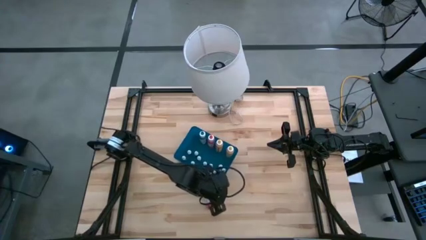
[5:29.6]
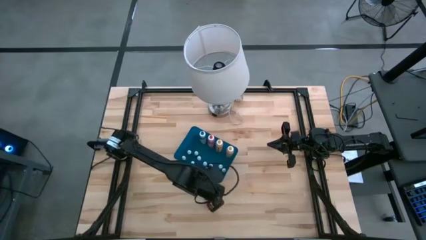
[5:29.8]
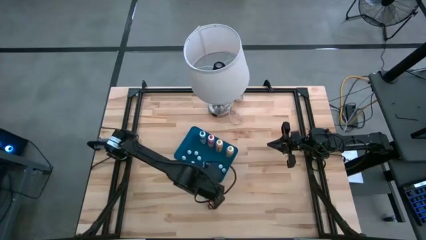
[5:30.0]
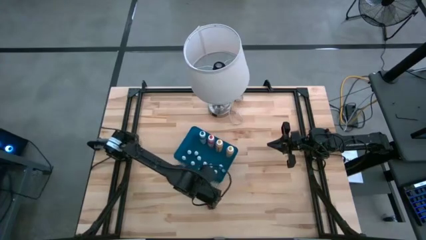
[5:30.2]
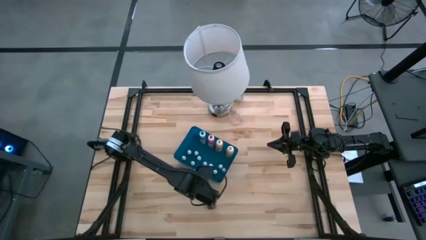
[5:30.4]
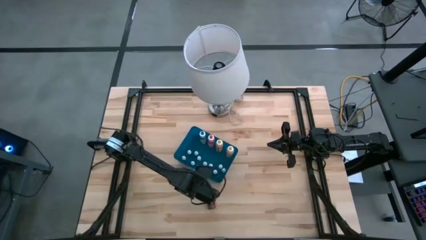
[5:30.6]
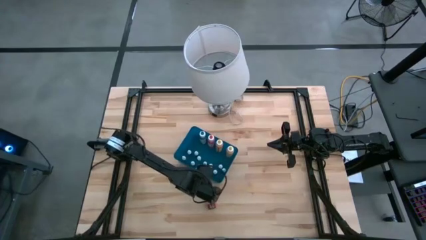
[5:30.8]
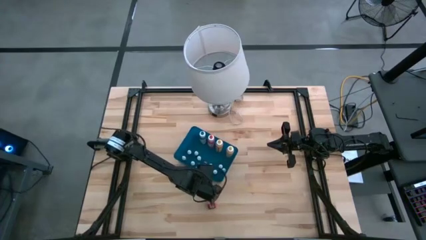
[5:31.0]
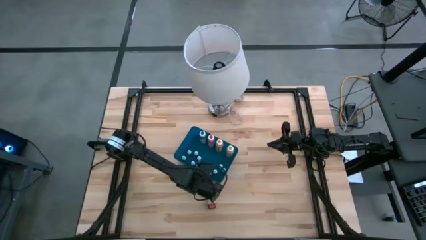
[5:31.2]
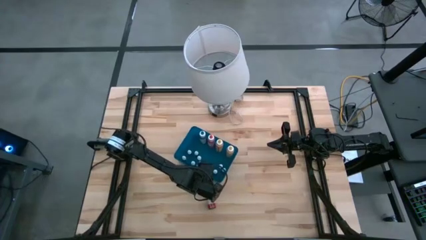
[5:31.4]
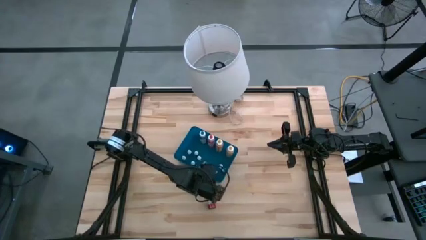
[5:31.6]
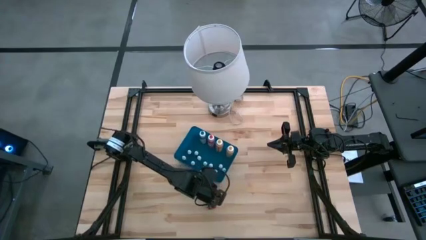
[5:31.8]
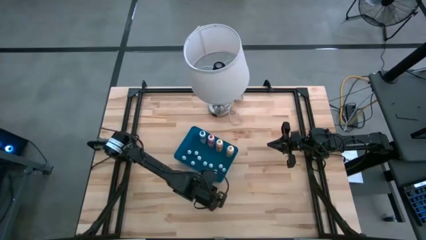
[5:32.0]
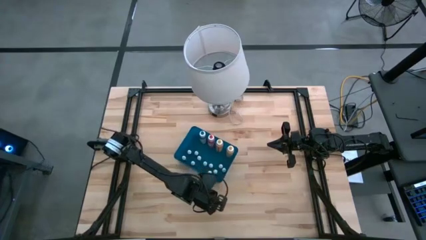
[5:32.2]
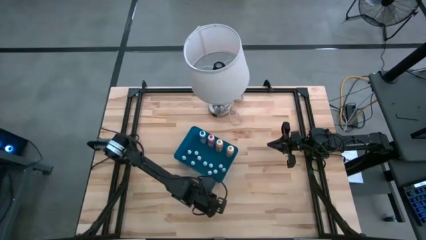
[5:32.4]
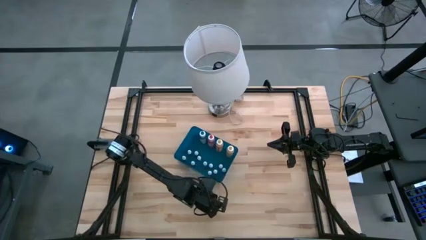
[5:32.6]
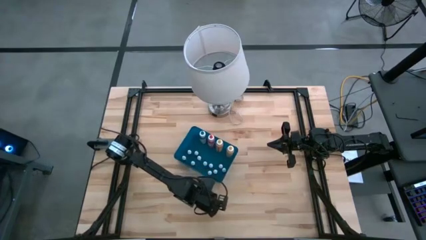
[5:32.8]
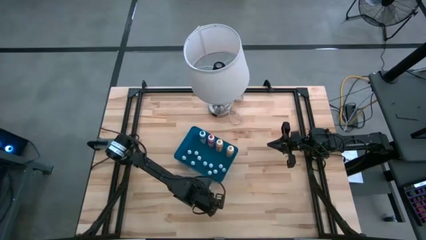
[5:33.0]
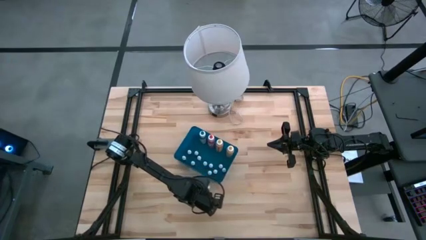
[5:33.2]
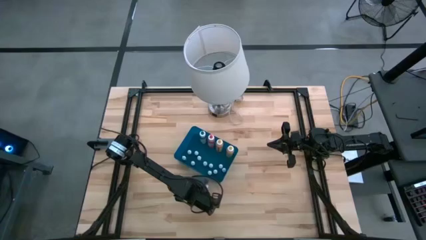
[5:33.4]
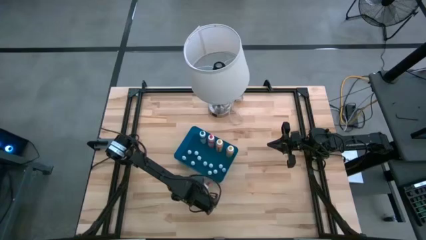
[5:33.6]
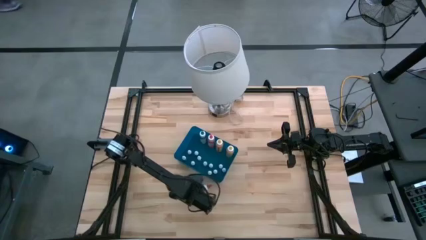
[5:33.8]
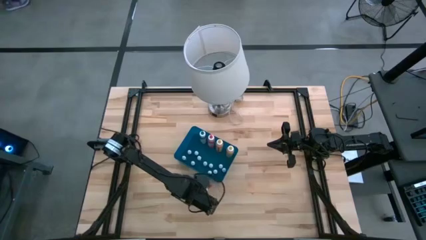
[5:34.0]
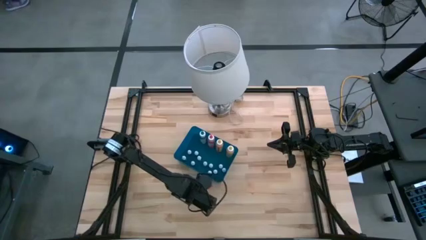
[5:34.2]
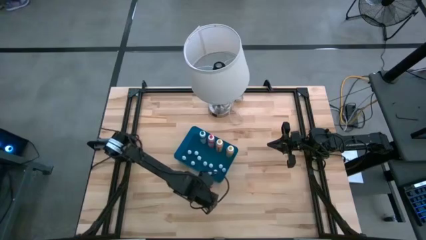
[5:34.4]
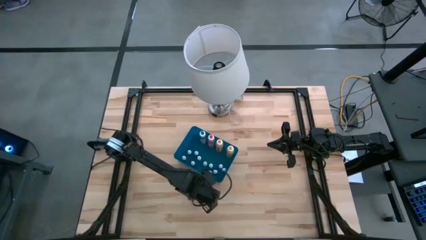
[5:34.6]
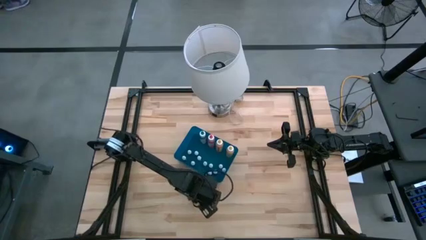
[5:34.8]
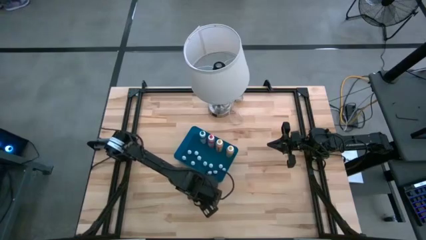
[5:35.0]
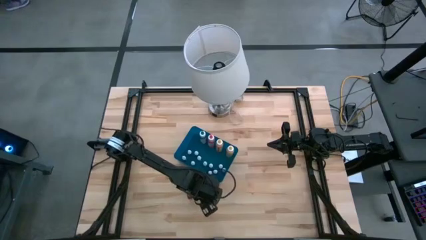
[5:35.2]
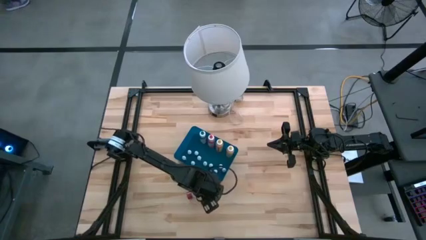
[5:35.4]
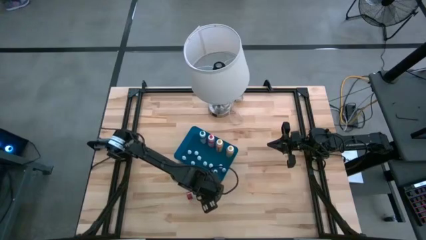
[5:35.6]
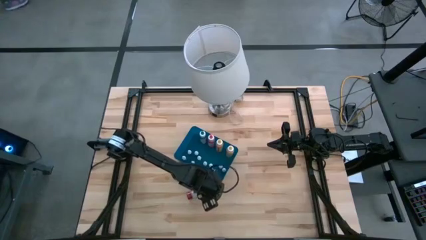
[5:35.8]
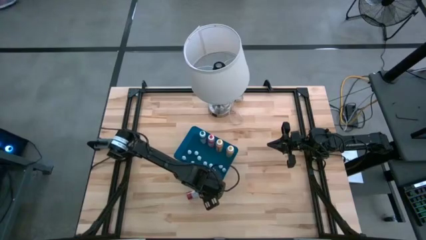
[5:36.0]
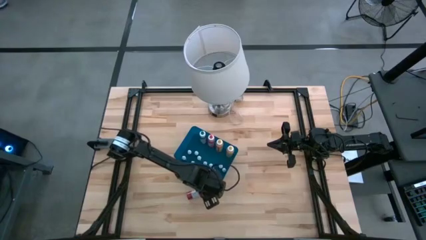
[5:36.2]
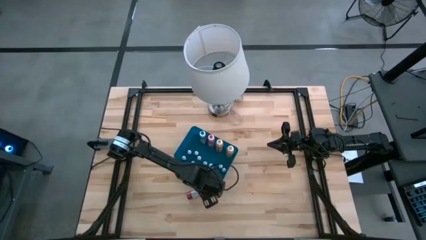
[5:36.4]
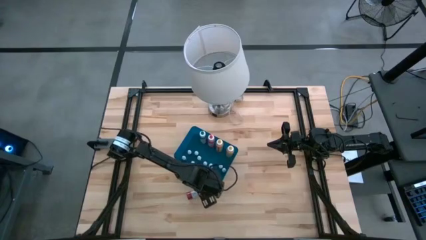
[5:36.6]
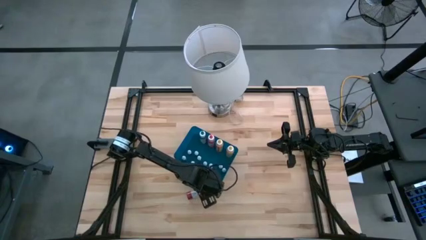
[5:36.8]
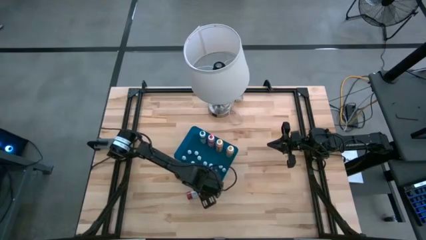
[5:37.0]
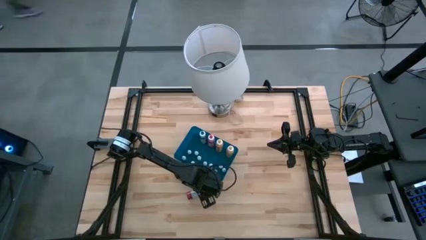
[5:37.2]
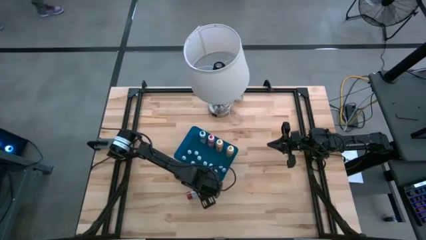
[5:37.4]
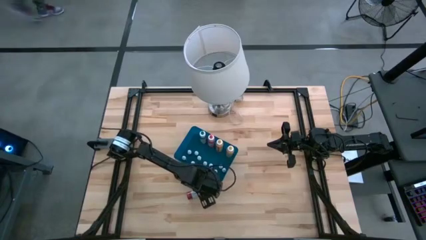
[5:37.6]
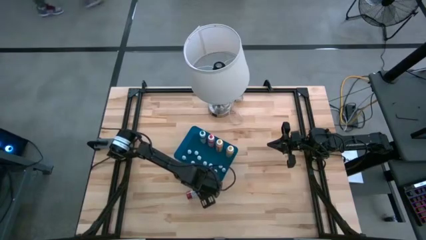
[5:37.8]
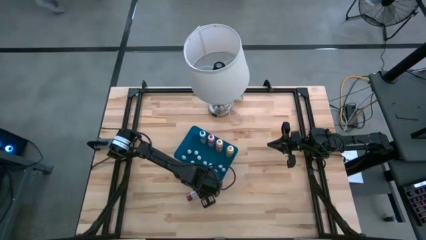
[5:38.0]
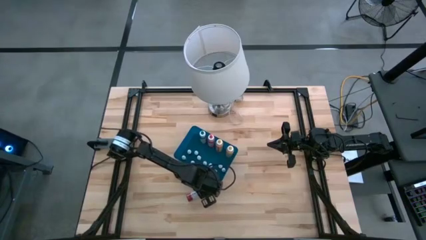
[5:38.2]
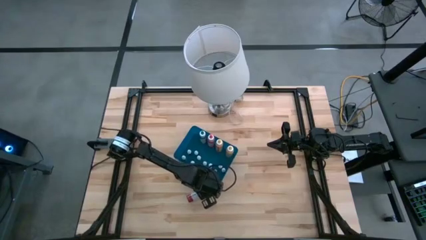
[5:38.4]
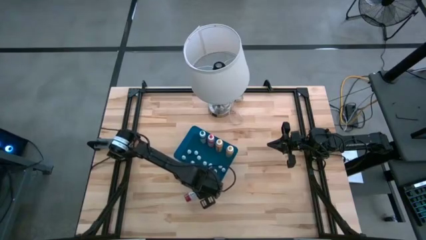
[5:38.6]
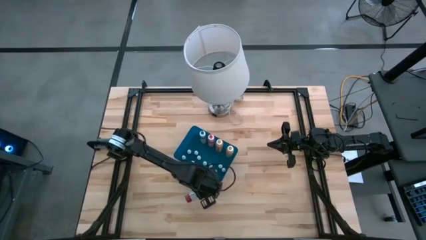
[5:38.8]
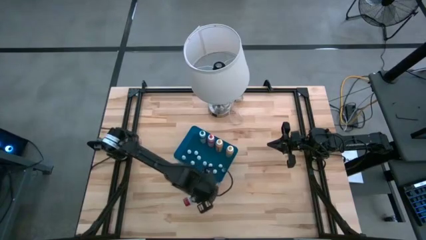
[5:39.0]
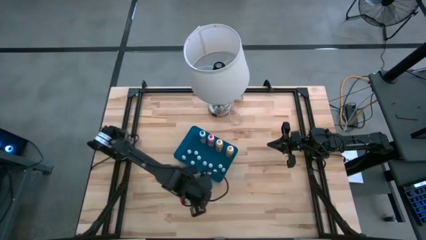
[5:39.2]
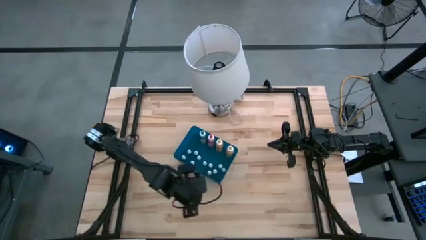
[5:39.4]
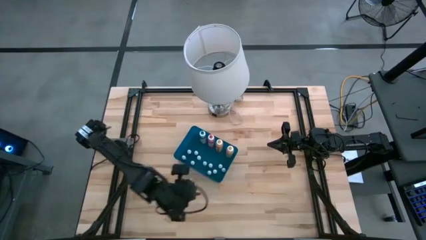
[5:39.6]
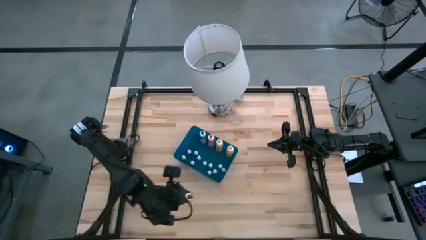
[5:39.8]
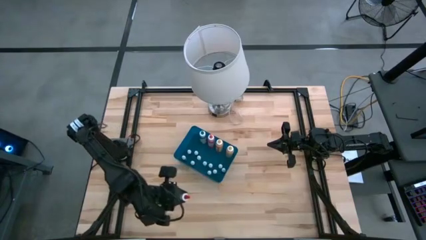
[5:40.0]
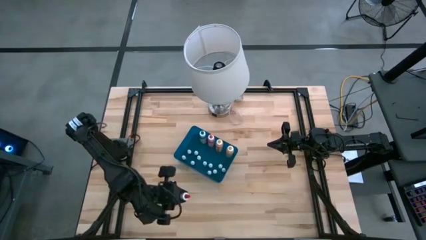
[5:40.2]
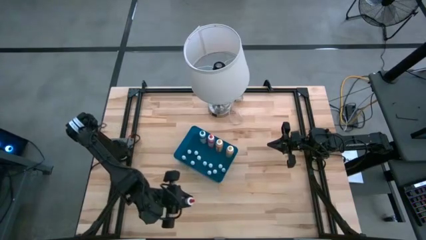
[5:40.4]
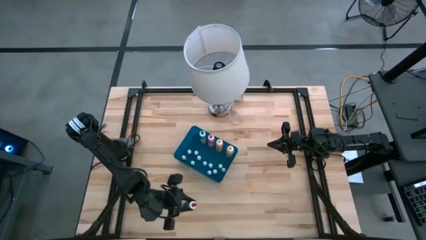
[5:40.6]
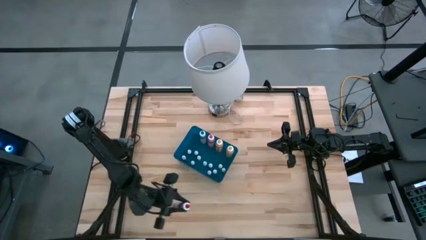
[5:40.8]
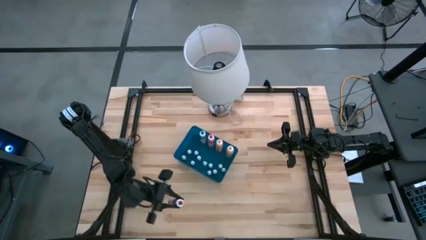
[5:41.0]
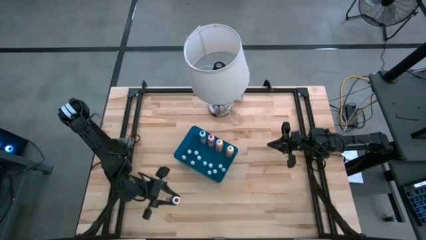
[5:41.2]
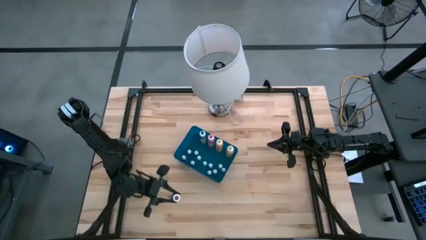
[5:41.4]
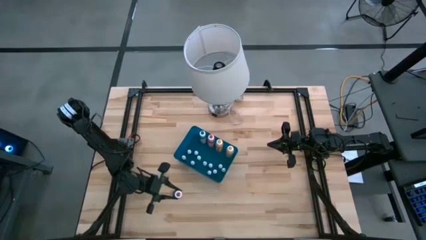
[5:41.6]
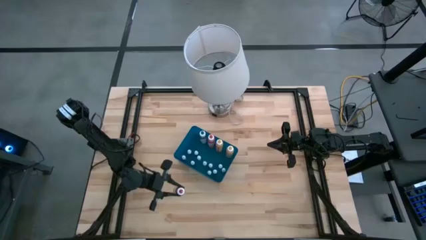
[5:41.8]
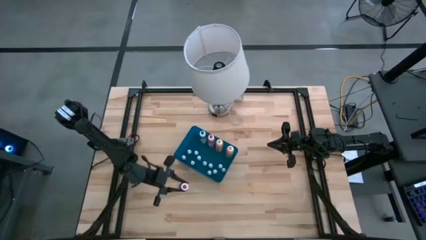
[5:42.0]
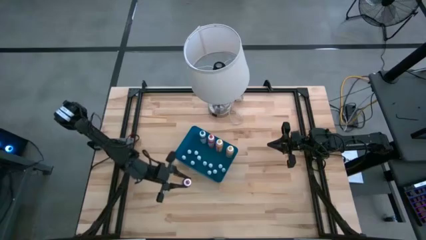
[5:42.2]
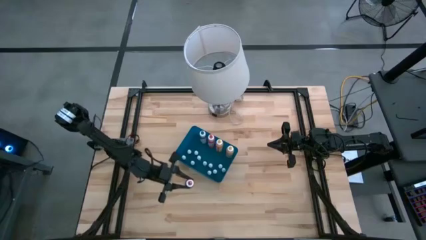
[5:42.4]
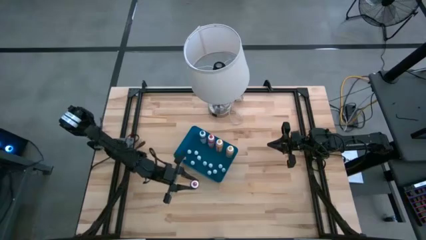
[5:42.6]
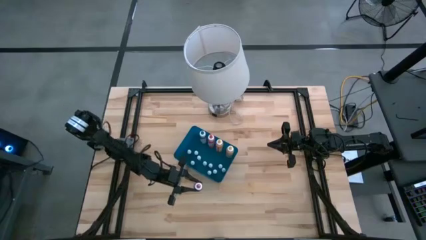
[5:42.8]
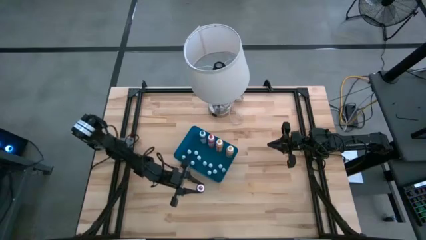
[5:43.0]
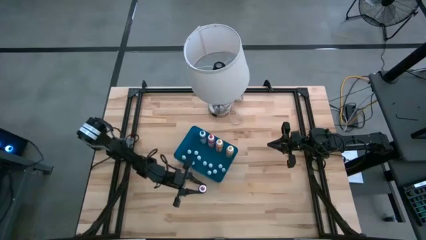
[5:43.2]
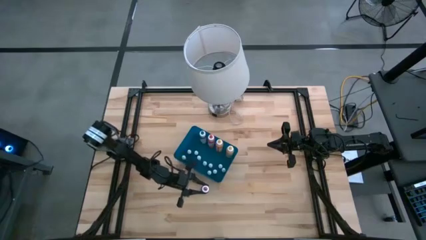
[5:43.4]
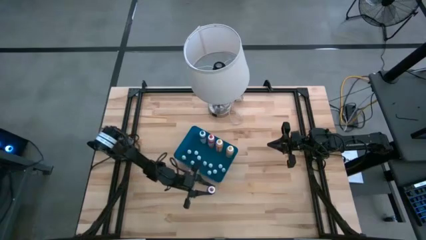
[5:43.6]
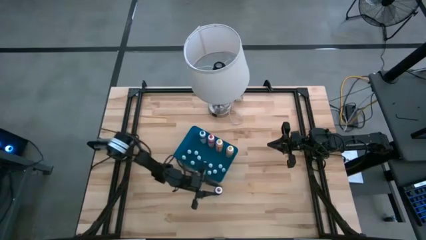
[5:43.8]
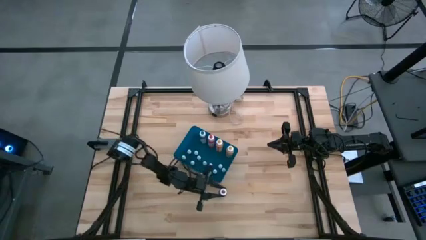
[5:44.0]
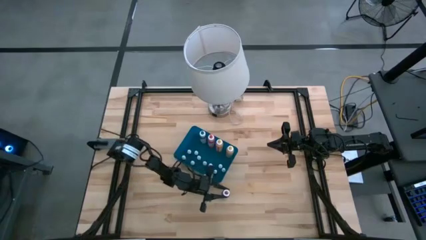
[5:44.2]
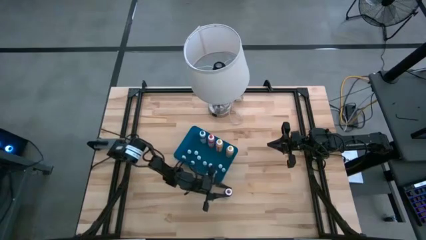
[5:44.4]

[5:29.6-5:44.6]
Task: Pick & Place food coloring
Put the large red food coloring bottle into the blue container
